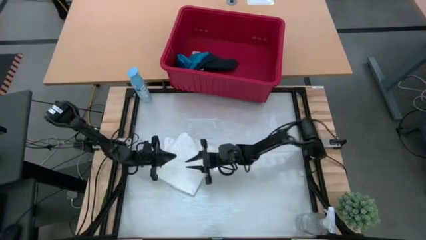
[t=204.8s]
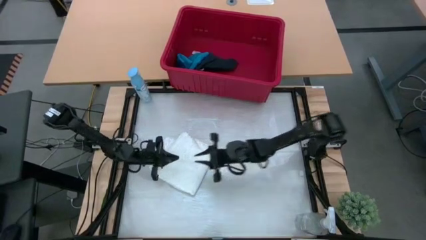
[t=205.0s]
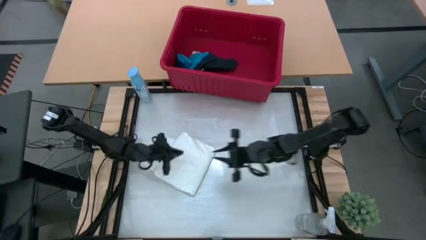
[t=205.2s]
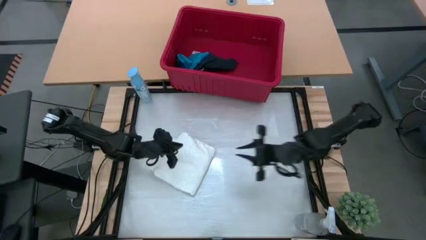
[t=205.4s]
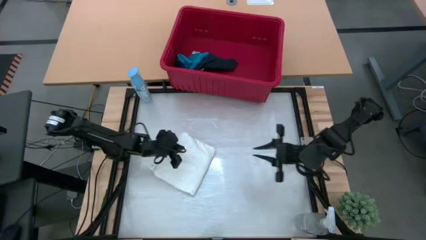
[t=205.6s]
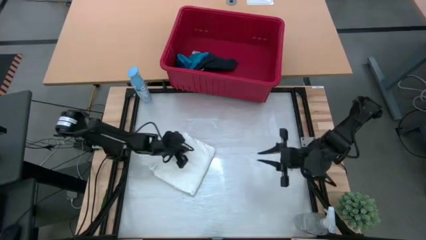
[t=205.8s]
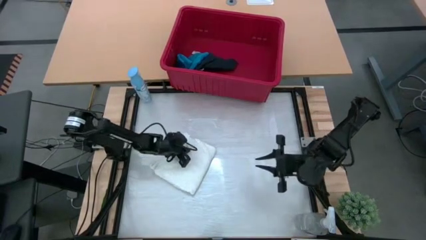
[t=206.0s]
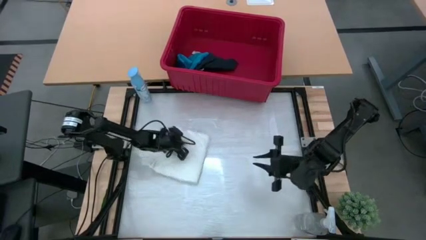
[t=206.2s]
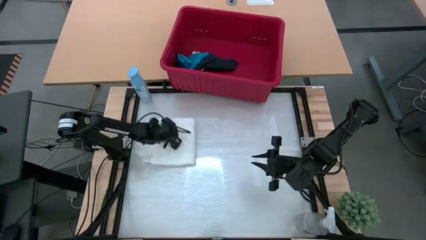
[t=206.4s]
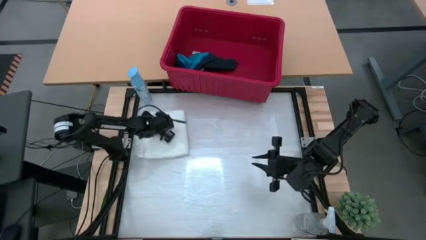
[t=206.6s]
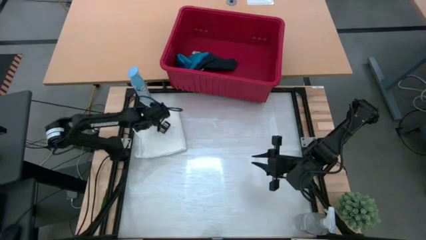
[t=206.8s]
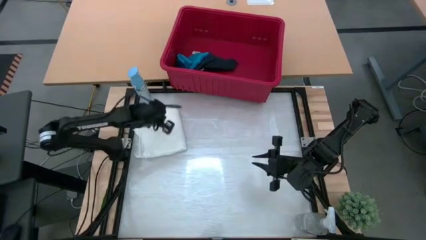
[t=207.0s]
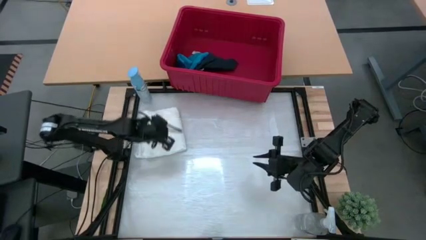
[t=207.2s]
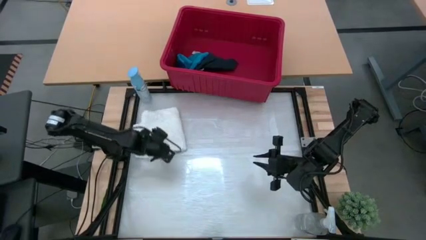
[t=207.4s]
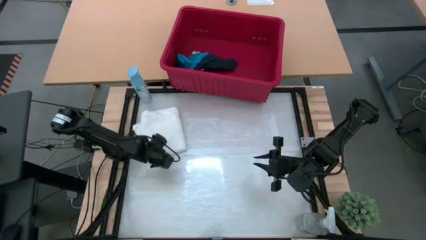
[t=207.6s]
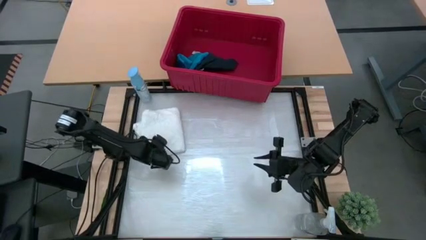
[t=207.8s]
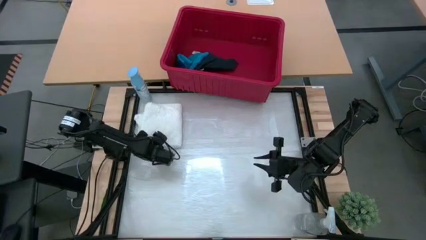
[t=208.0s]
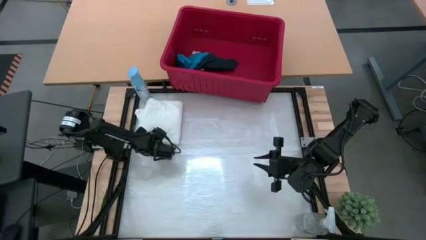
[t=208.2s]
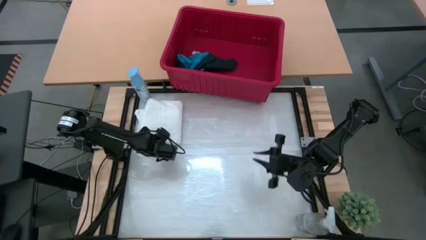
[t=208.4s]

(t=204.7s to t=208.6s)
Task: Fold Laundry from Bin
Move the white shirt to the top left

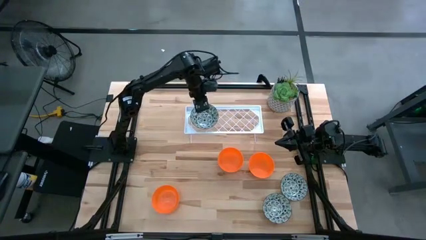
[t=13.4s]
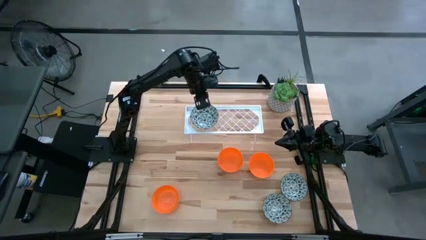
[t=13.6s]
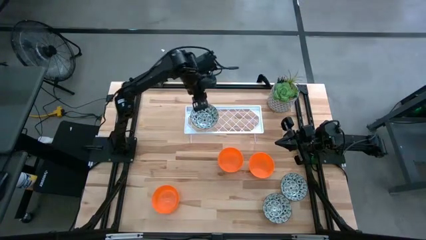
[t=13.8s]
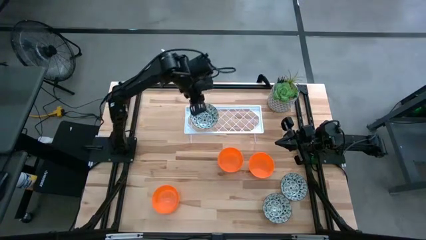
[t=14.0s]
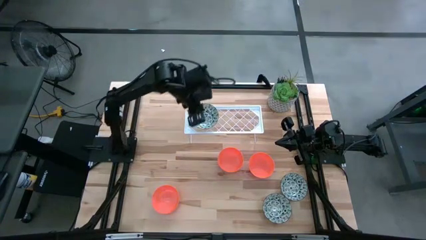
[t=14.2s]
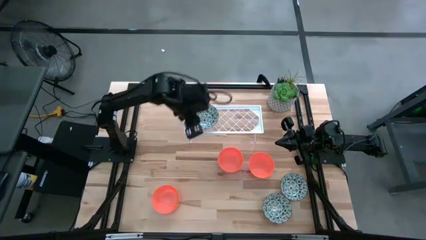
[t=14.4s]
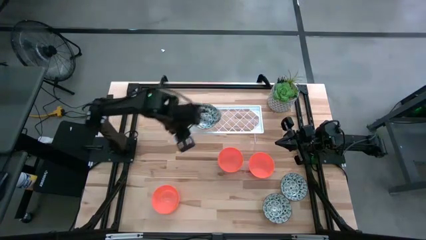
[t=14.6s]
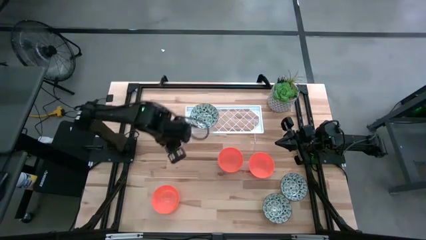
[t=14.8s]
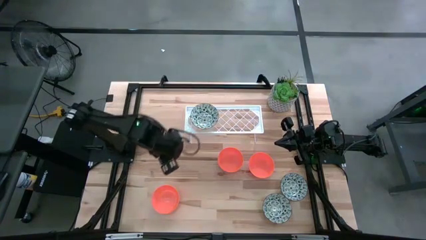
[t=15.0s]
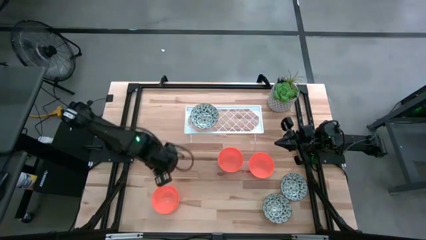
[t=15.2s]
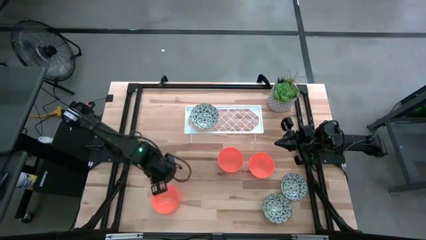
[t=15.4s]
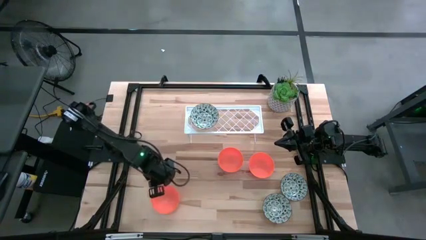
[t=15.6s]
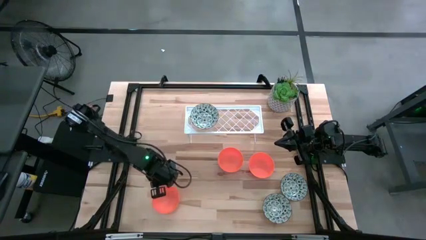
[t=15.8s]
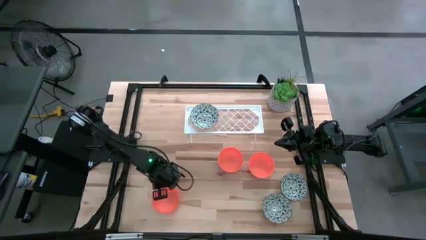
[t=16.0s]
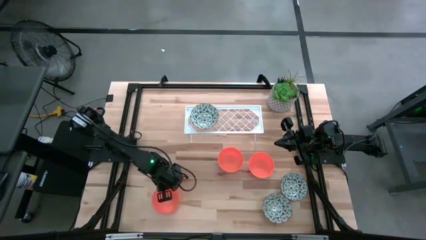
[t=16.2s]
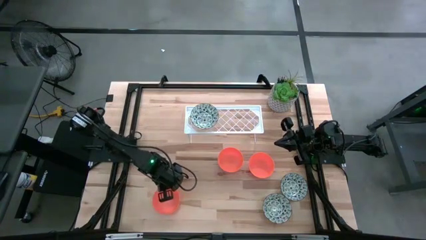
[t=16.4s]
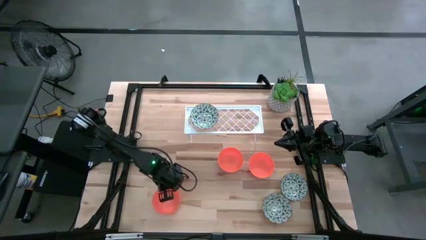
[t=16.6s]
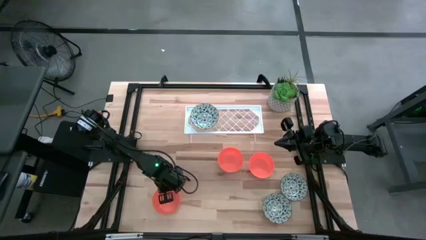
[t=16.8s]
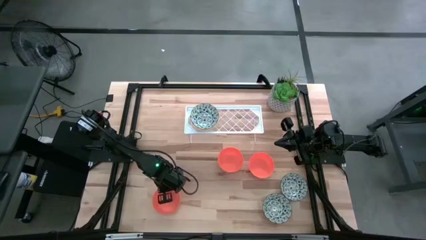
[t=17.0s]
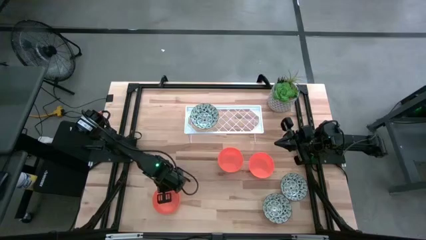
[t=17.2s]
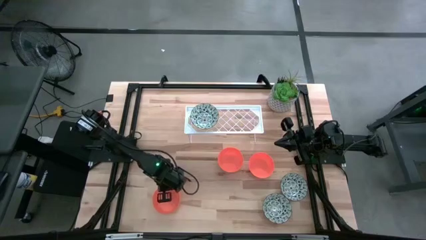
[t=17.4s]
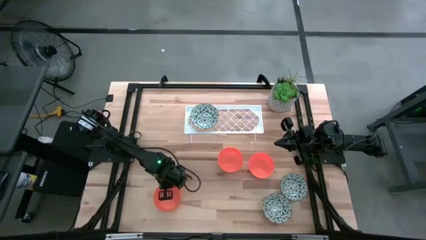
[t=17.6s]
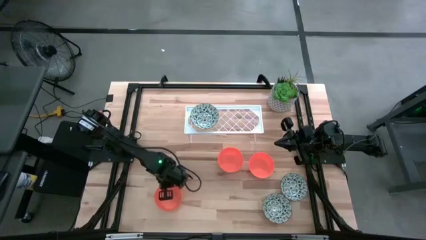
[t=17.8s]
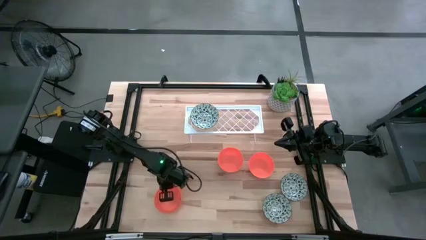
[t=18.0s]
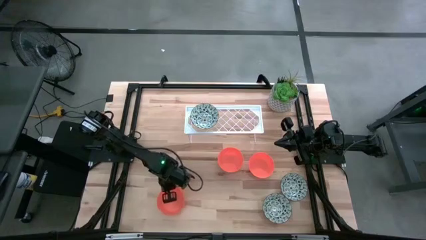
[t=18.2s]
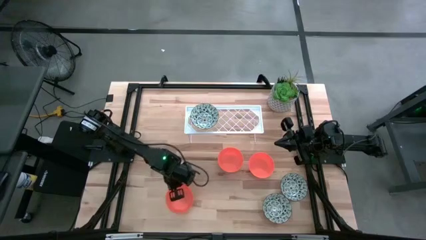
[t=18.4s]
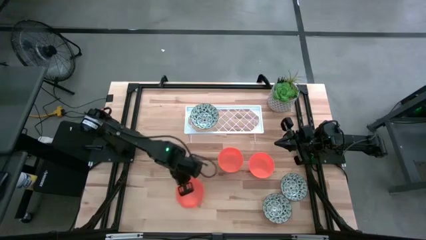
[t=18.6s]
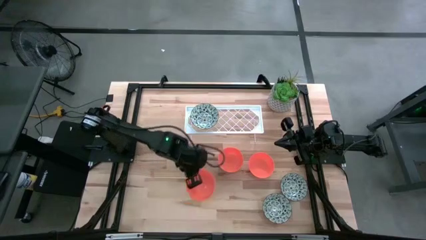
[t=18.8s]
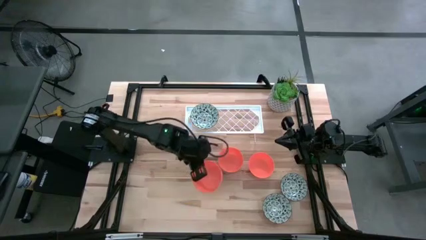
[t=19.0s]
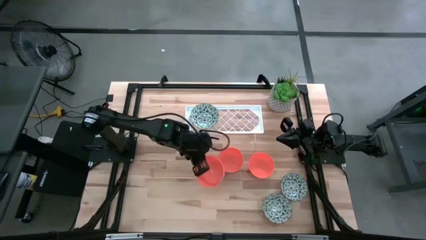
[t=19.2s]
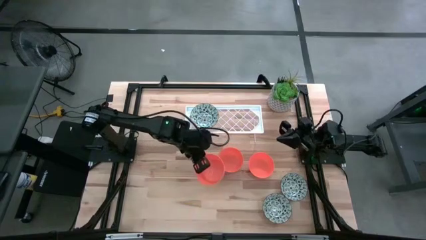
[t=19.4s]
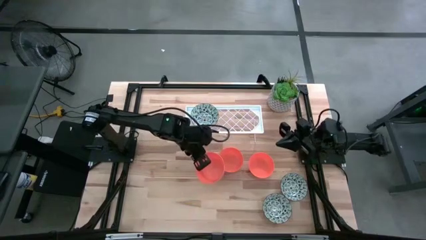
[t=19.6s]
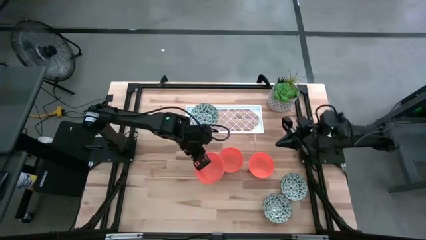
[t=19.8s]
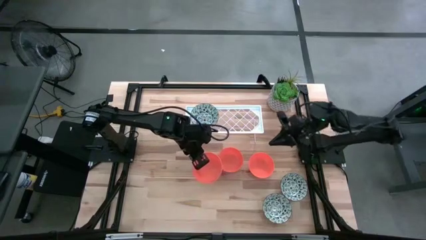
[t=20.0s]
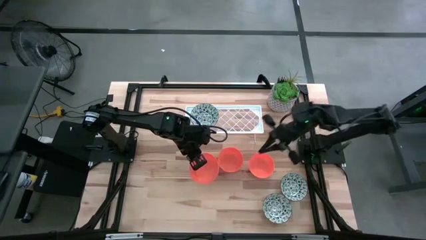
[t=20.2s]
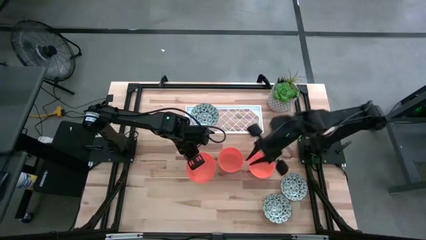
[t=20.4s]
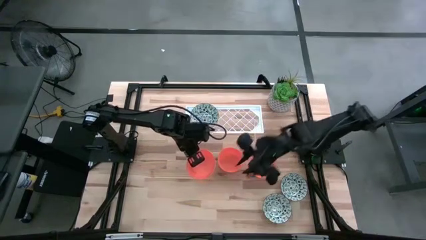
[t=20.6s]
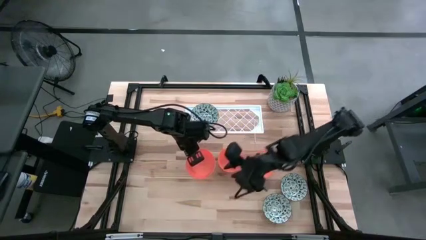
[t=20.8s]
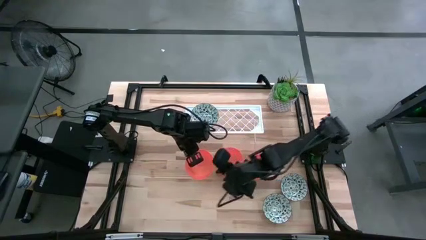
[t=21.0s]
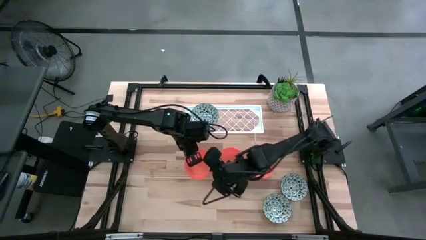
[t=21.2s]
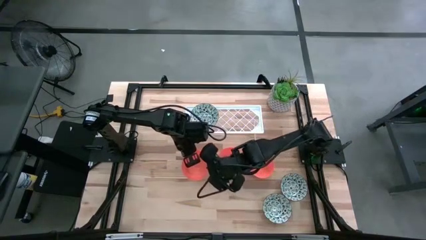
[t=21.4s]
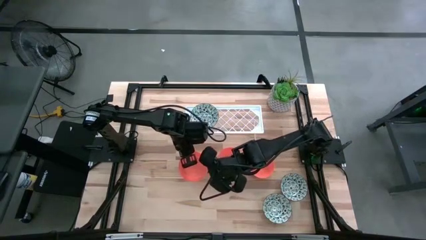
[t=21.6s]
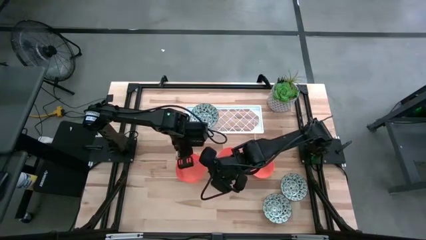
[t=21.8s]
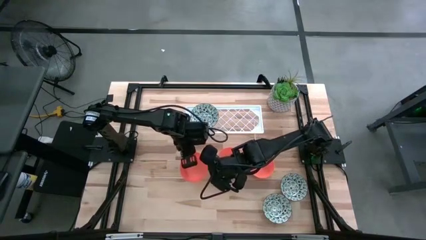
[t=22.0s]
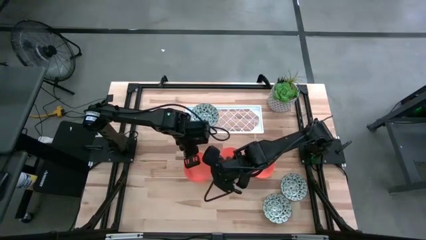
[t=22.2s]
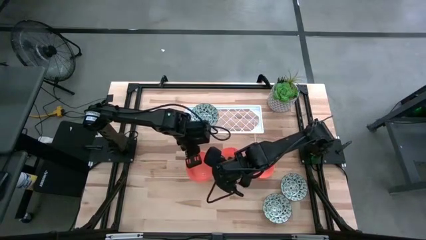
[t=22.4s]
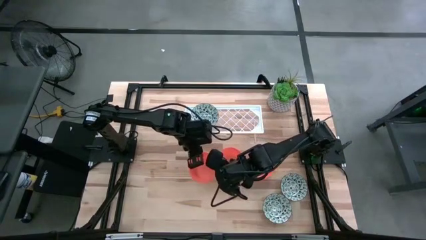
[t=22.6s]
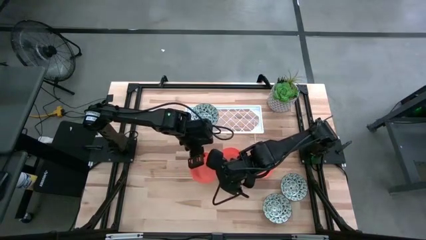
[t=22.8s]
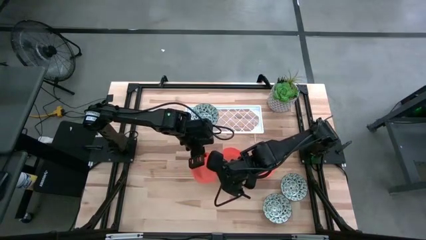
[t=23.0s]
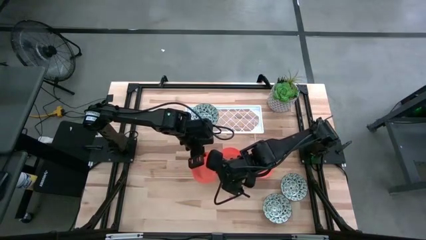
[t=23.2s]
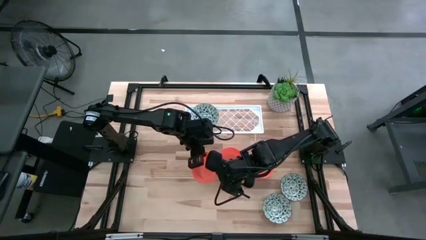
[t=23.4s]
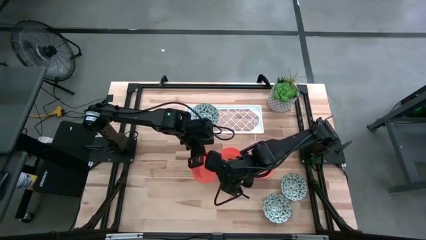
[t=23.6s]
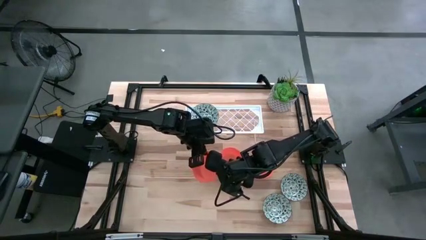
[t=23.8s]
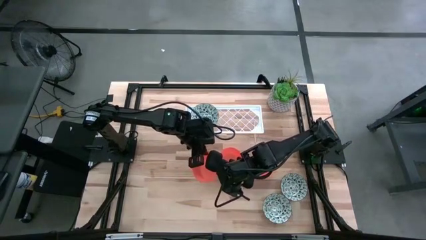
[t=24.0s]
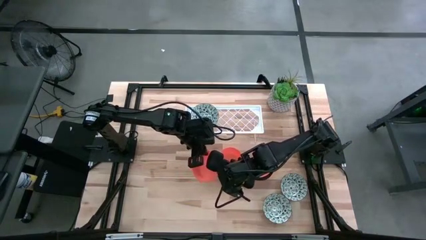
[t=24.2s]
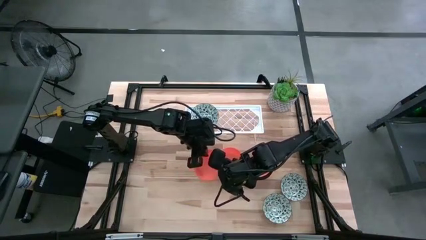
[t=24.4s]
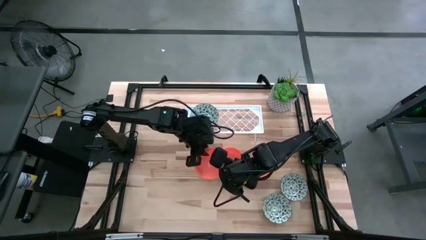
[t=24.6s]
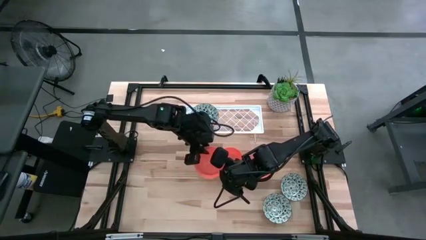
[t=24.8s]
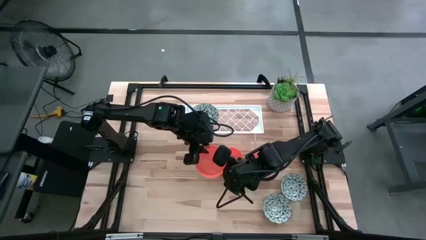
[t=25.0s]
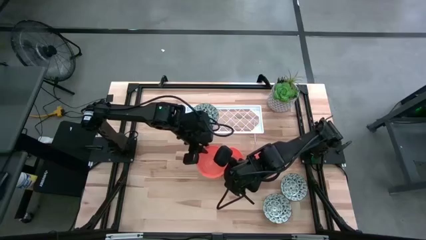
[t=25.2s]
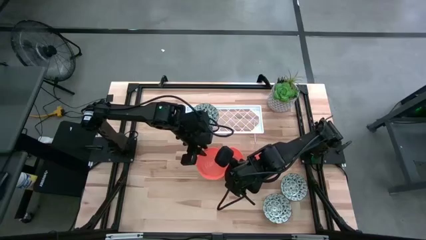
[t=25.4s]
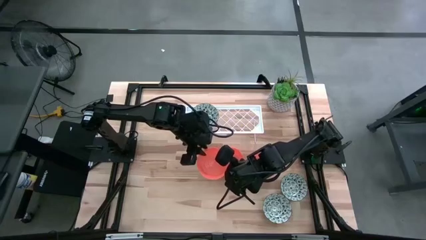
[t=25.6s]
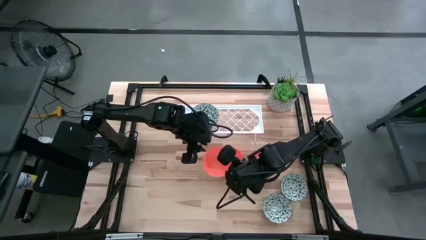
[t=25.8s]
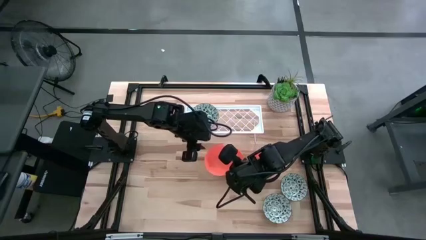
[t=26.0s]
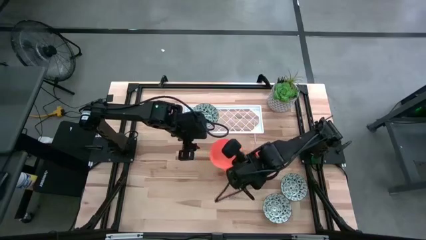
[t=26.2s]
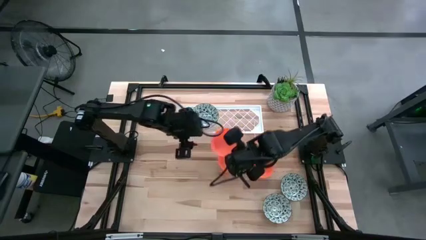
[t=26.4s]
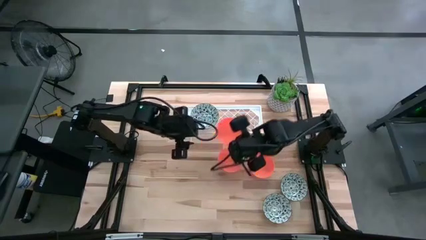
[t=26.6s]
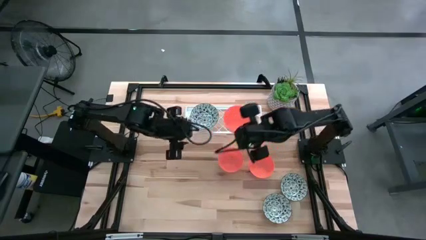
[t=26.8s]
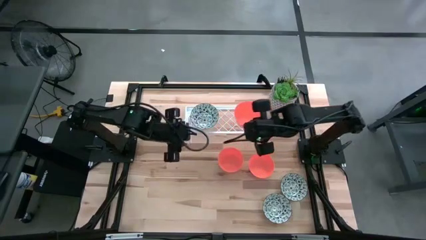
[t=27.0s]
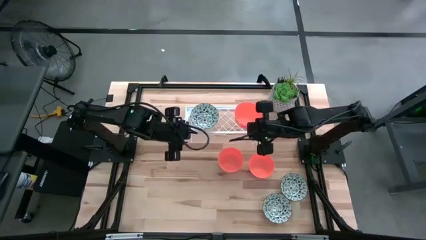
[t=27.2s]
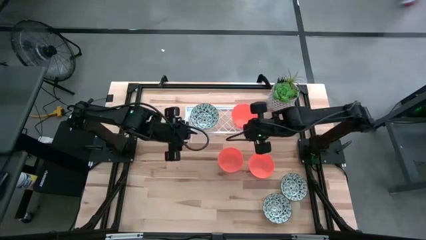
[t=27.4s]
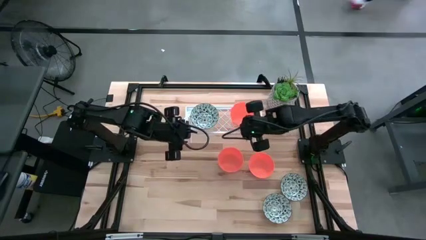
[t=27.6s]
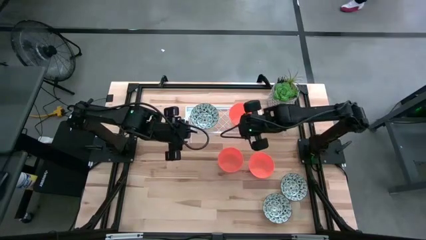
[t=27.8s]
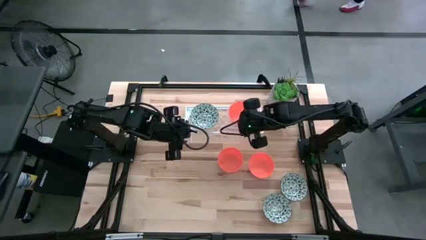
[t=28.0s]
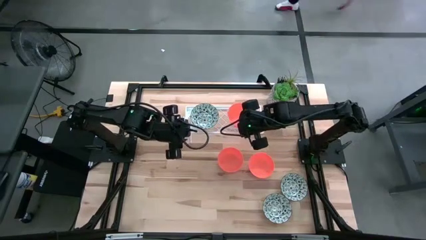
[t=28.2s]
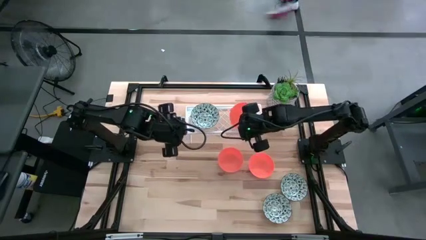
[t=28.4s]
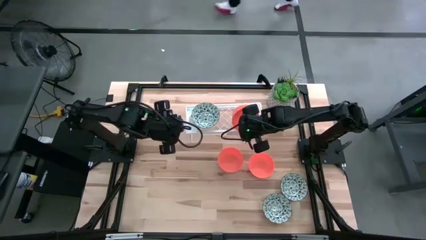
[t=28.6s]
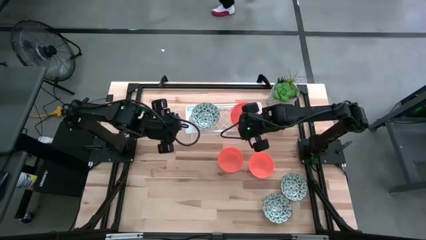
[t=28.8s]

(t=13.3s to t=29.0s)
Task: Pick & Place Mini bowls
Put the left orange bowl on the shelf
